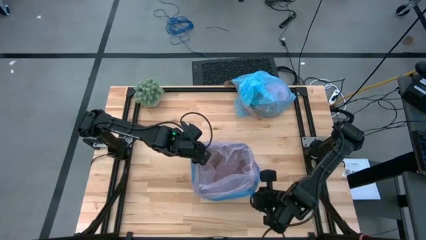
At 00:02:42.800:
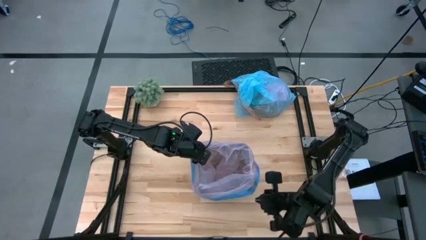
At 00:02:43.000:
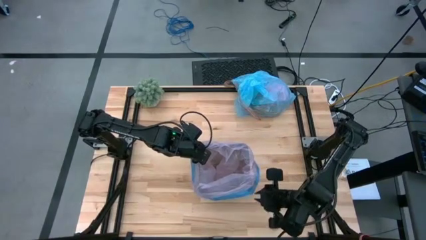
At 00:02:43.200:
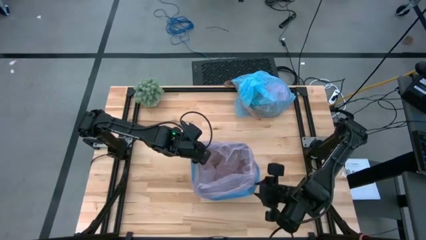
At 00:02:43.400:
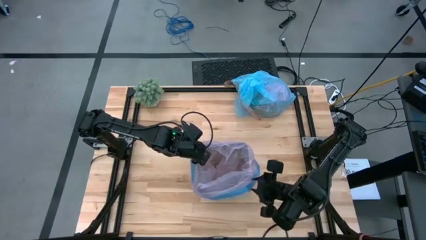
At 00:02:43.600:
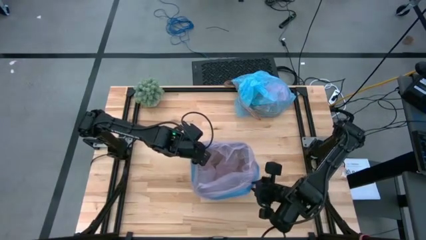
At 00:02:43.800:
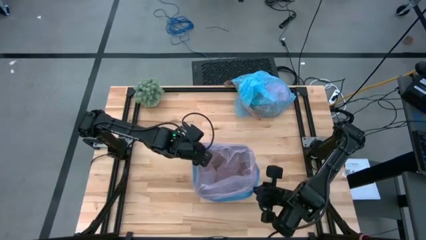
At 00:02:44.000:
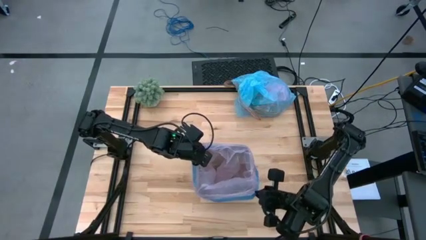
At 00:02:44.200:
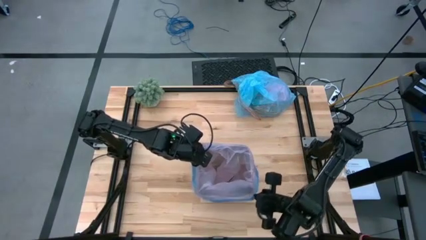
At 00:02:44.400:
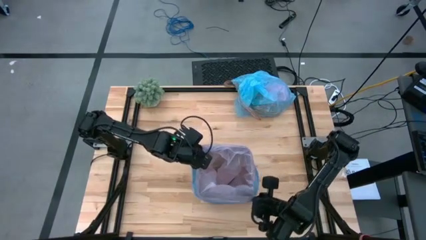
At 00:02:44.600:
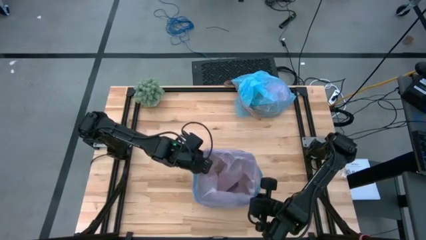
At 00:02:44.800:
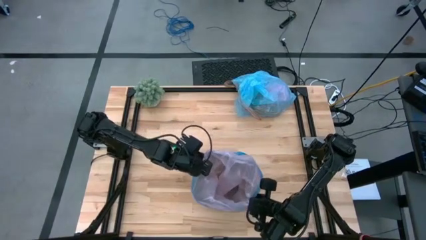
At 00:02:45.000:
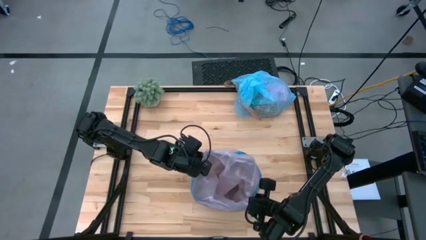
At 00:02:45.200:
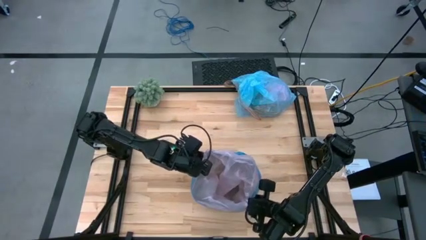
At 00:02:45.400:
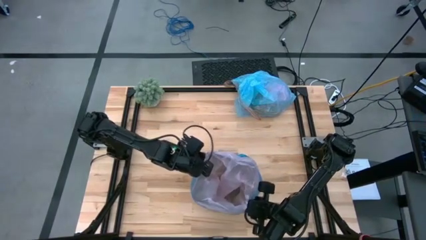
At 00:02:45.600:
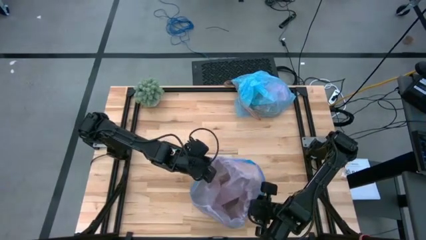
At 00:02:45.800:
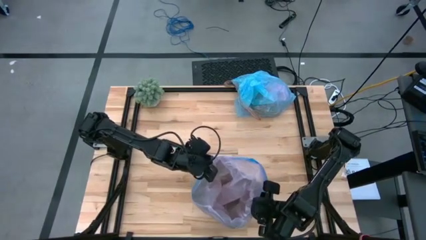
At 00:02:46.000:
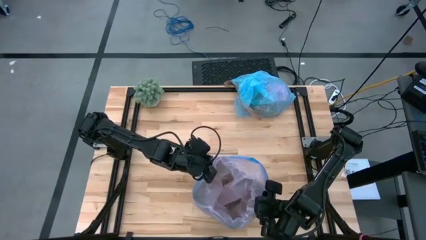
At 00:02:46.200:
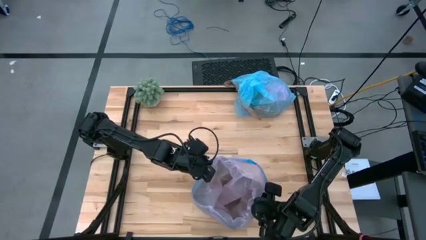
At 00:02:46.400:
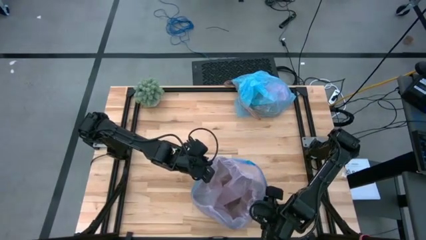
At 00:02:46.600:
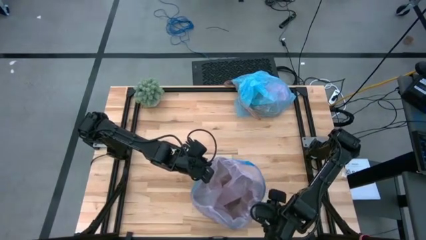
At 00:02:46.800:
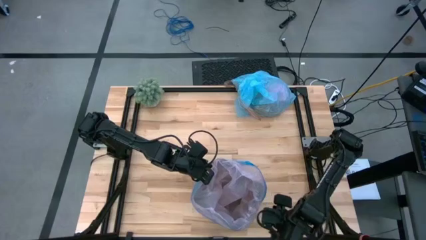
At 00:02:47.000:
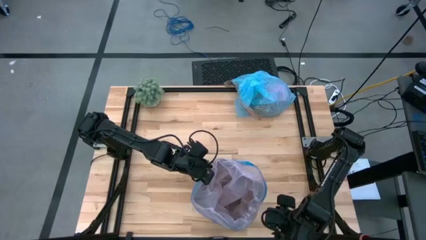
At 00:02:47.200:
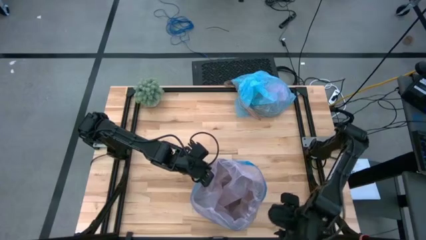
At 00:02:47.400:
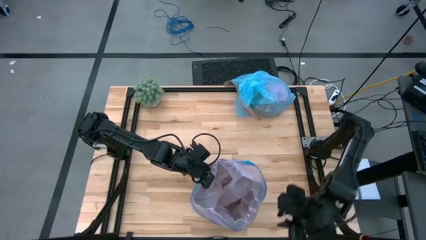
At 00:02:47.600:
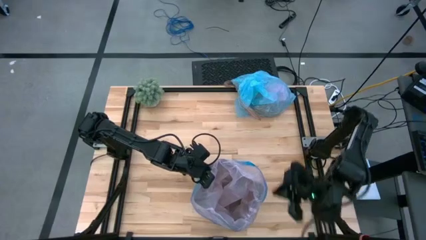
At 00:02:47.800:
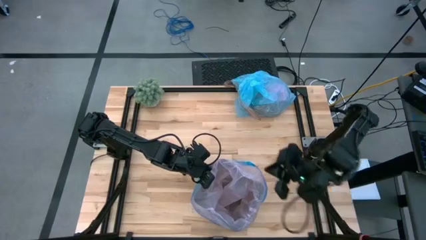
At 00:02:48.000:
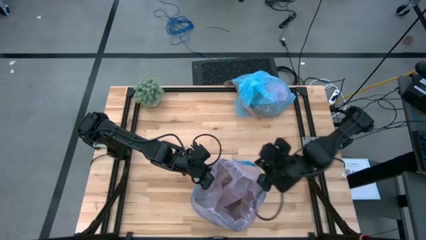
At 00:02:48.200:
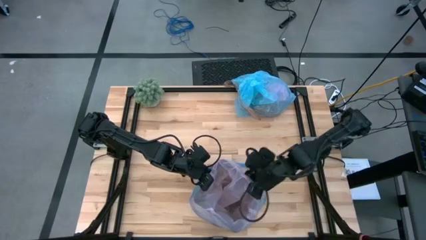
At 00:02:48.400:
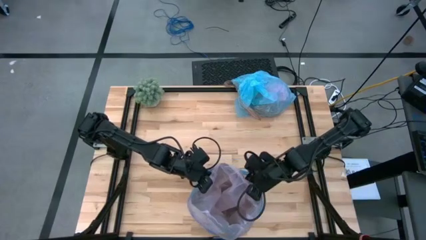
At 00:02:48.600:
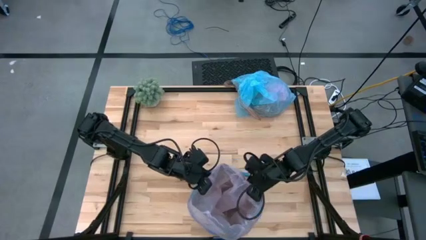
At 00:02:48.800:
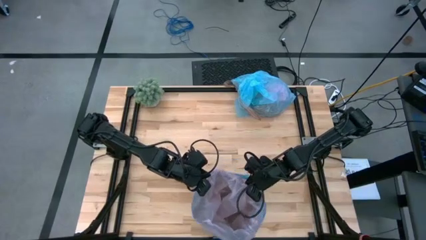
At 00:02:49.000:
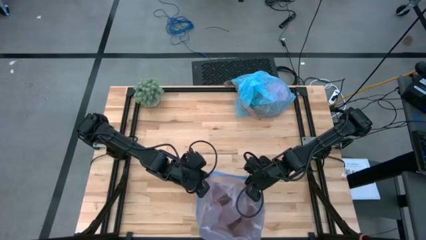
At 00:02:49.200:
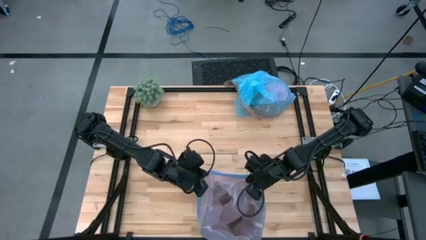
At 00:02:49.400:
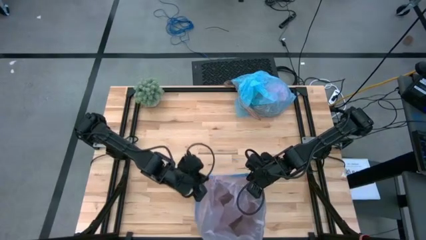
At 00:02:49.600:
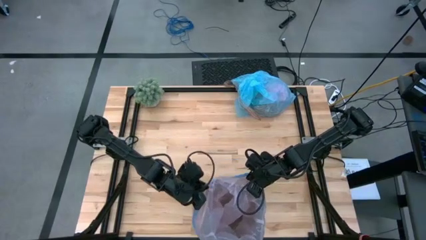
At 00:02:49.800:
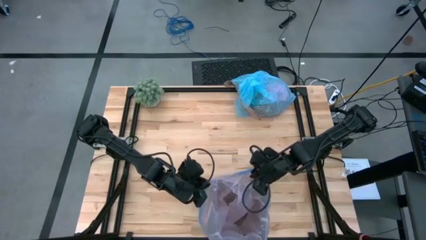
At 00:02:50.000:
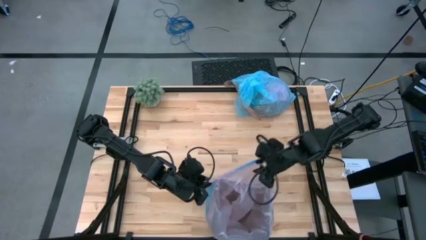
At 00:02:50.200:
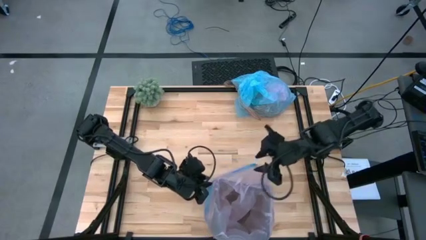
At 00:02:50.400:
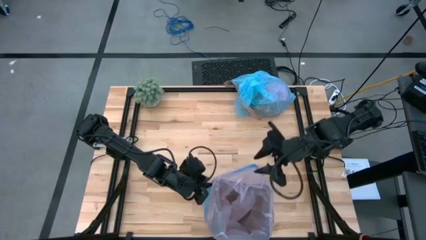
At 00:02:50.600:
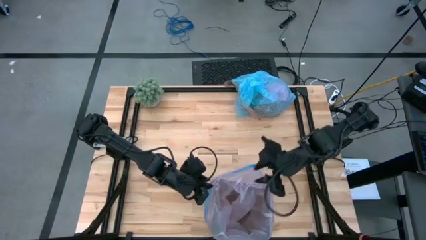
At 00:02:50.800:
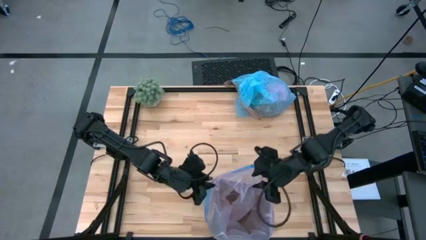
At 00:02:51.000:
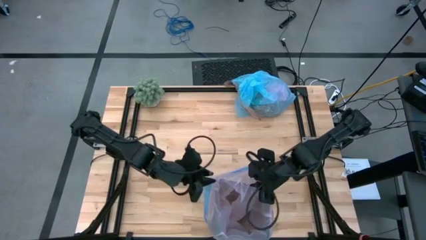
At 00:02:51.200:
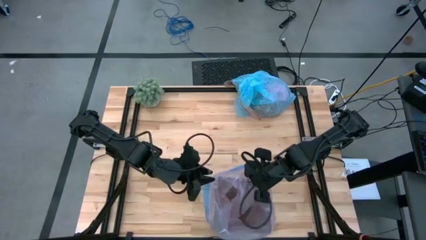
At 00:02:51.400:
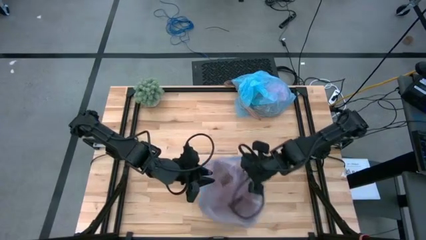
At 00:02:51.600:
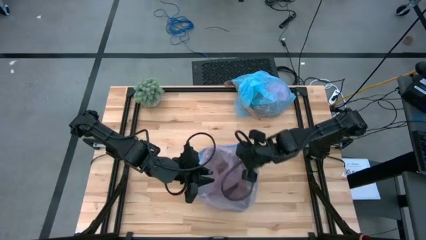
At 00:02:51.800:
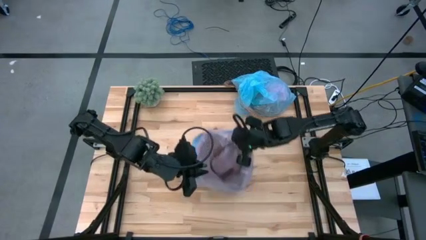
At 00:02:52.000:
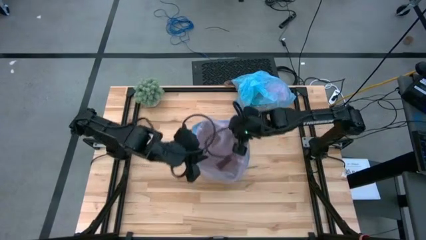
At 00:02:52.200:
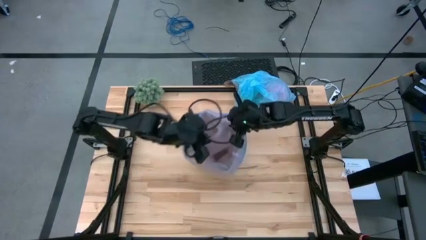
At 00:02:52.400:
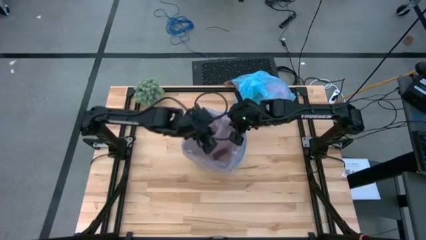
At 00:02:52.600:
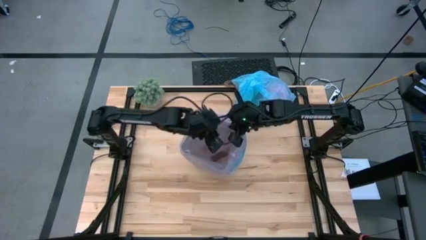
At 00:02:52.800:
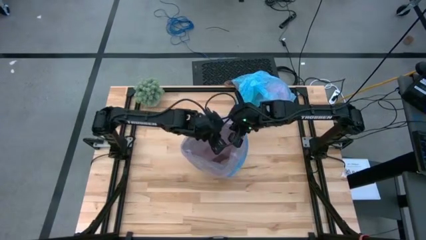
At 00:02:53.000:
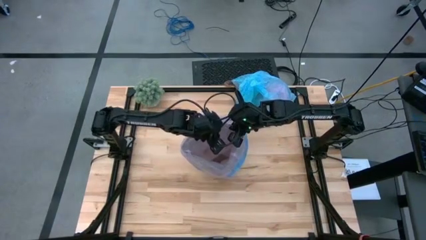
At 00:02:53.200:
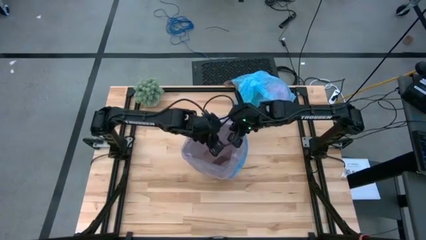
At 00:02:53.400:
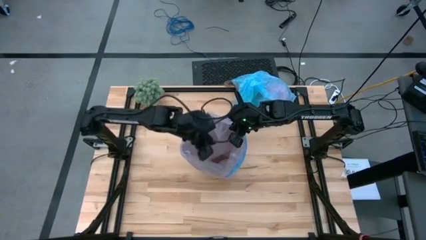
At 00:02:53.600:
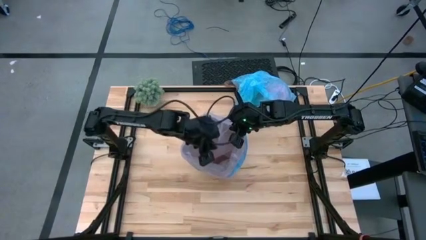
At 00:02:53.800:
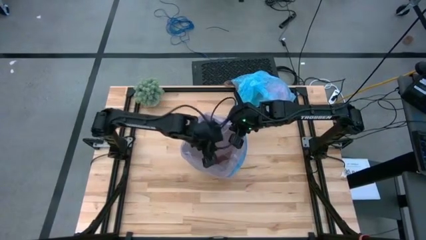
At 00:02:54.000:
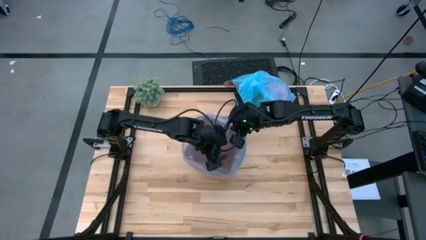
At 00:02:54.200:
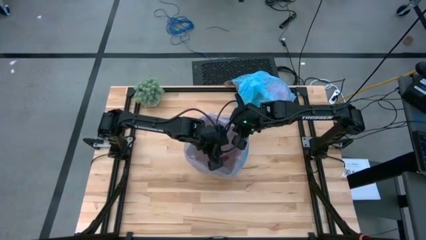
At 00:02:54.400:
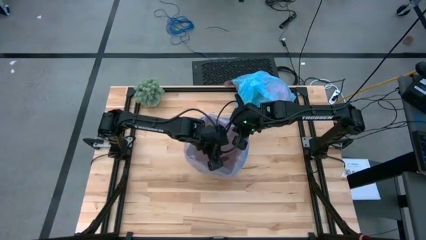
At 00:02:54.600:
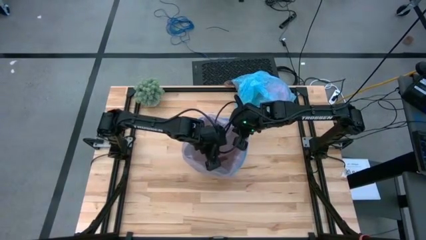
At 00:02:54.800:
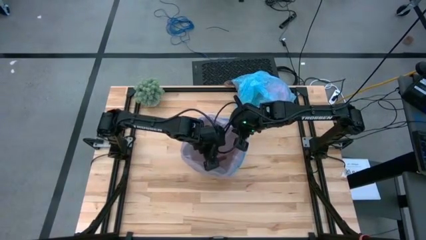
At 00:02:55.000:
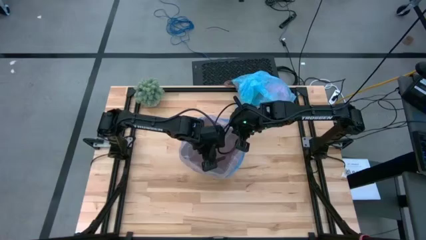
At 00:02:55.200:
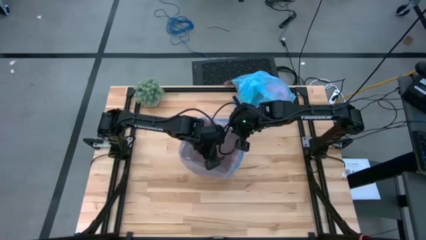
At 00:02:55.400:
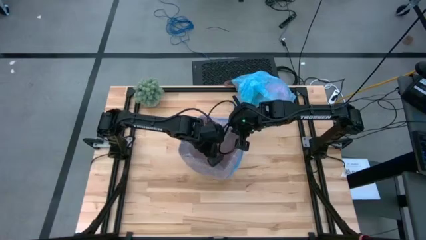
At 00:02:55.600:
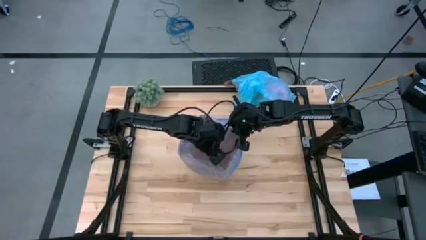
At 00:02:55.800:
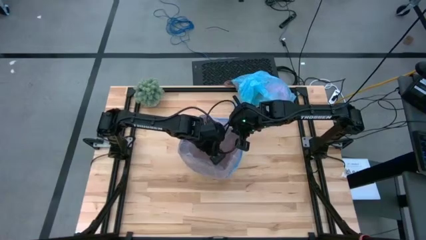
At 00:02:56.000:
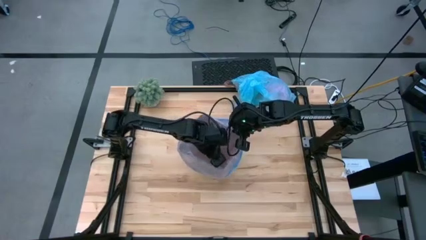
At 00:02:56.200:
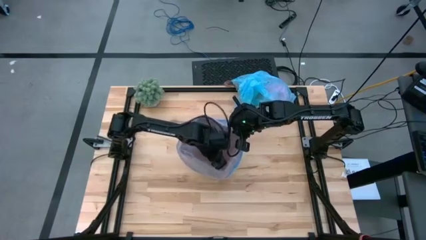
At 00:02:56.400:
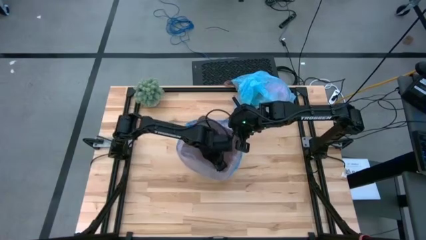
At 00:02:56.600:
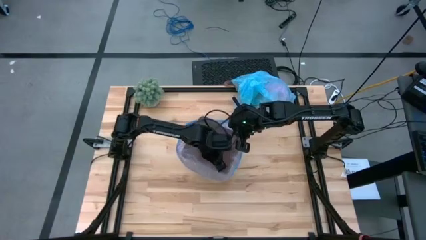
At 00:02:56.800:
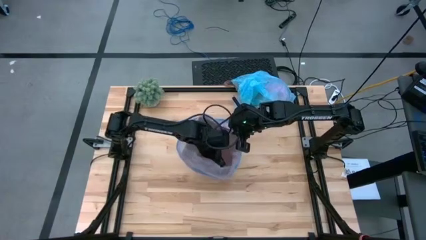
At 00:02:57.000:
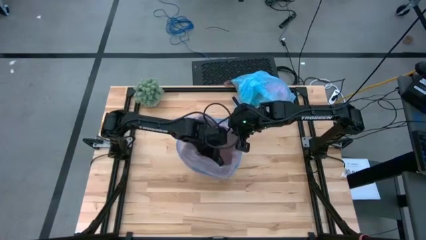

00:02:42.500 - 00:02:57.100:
Task: place trash/remove bag and relplace
Insert the pink trash bag into the trash bin
